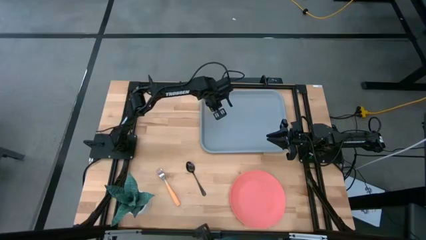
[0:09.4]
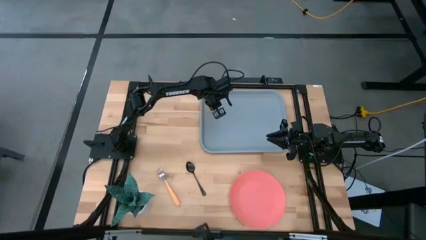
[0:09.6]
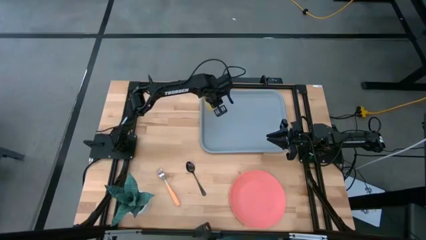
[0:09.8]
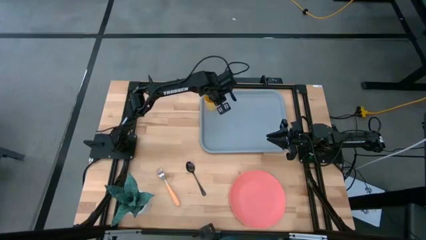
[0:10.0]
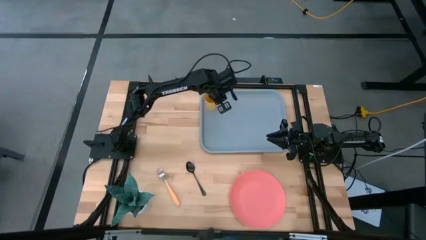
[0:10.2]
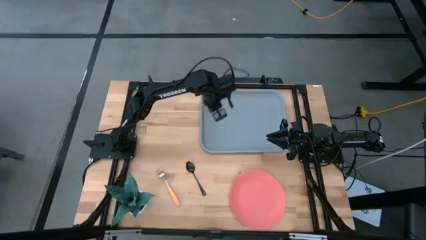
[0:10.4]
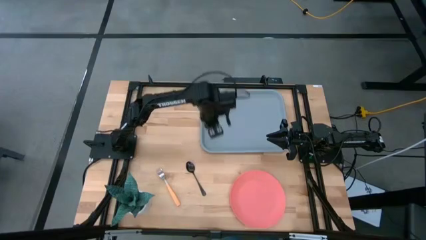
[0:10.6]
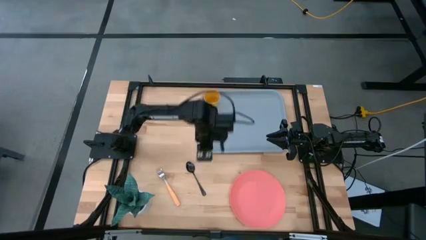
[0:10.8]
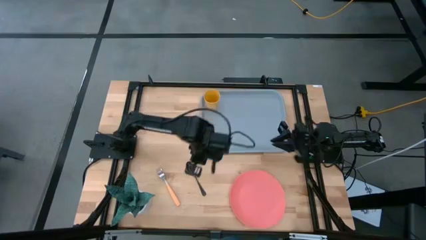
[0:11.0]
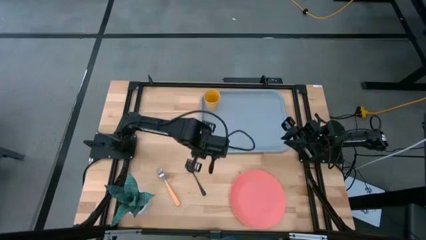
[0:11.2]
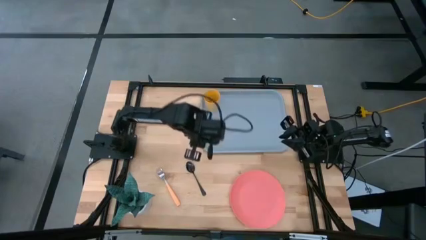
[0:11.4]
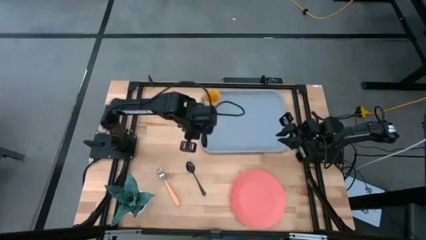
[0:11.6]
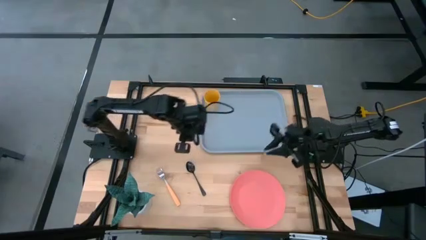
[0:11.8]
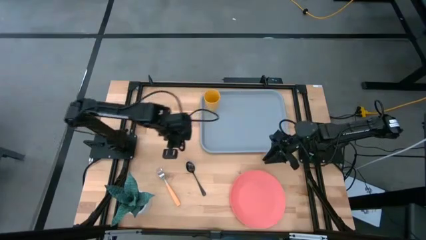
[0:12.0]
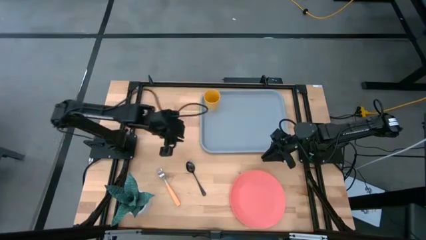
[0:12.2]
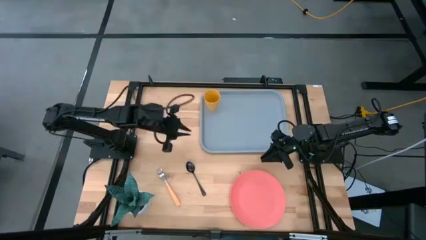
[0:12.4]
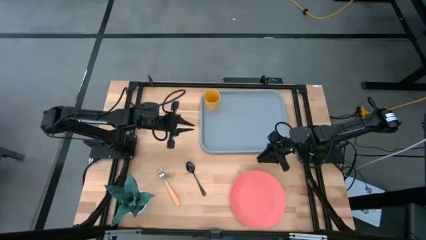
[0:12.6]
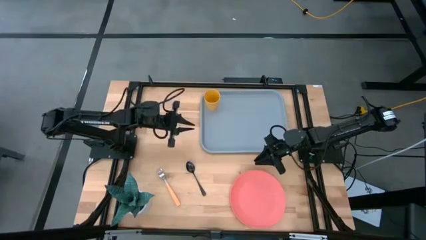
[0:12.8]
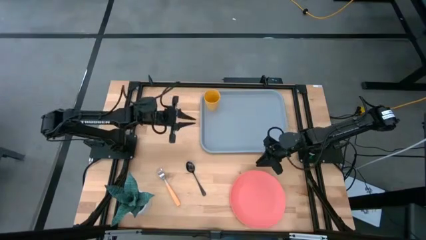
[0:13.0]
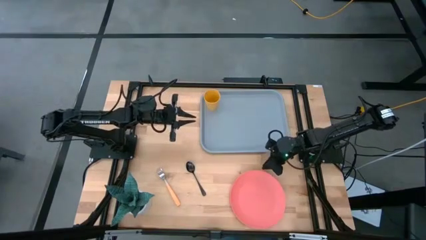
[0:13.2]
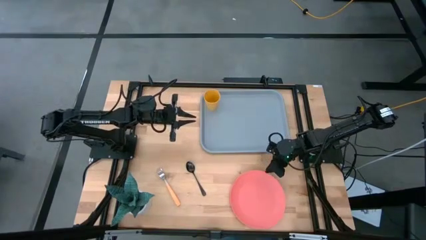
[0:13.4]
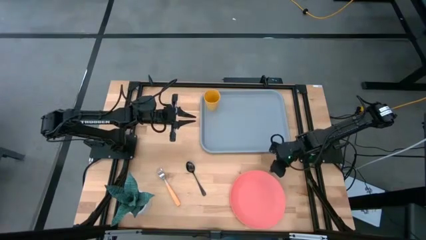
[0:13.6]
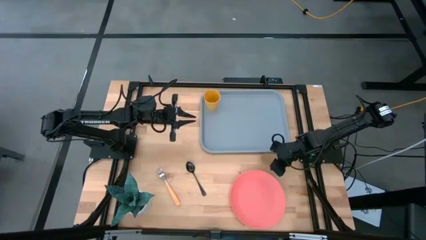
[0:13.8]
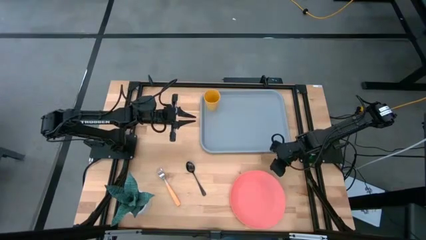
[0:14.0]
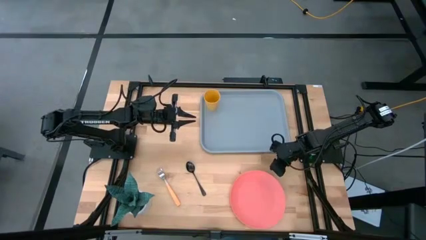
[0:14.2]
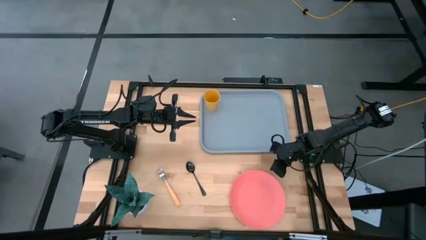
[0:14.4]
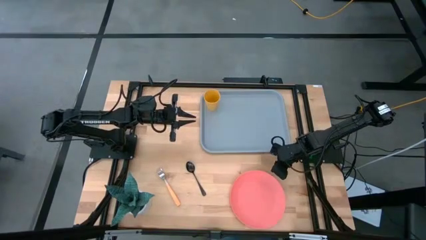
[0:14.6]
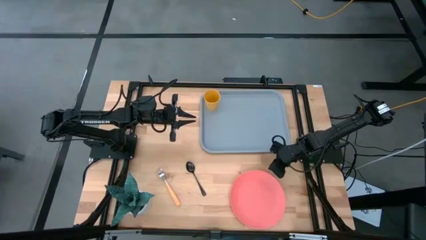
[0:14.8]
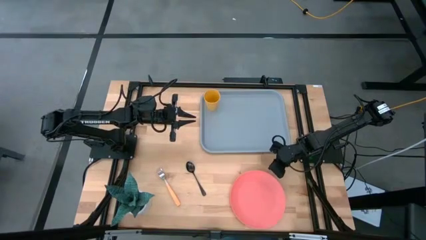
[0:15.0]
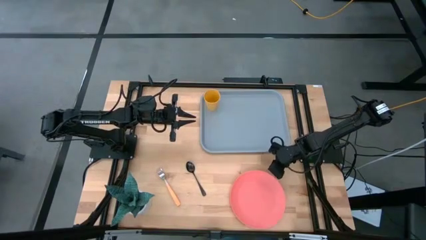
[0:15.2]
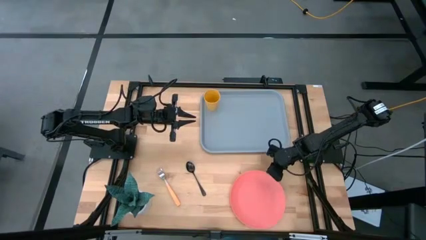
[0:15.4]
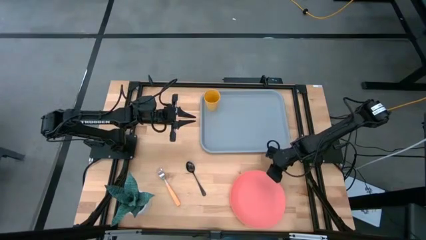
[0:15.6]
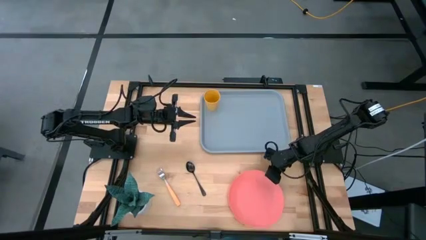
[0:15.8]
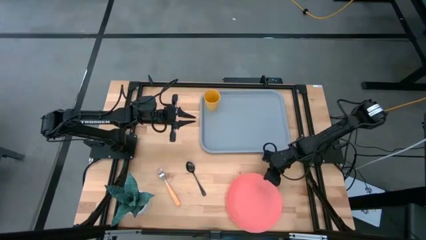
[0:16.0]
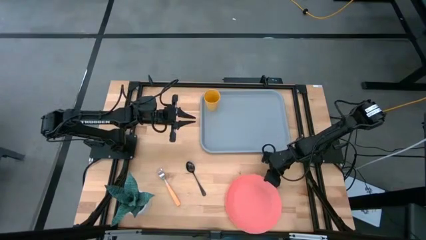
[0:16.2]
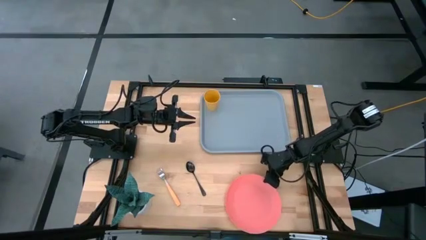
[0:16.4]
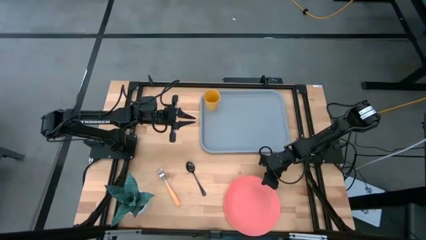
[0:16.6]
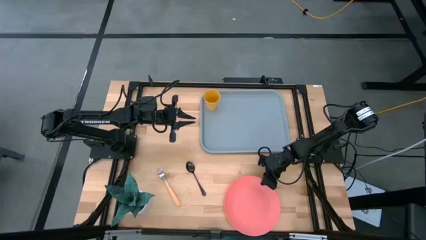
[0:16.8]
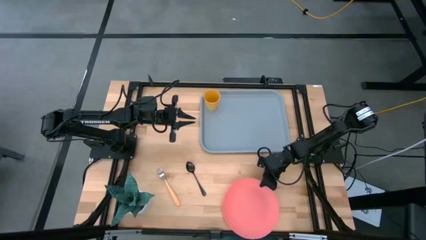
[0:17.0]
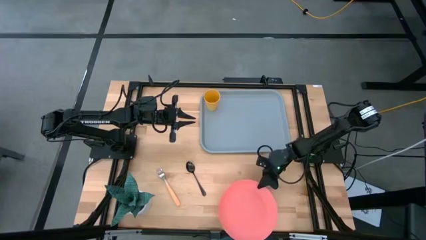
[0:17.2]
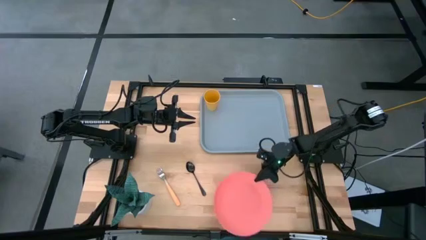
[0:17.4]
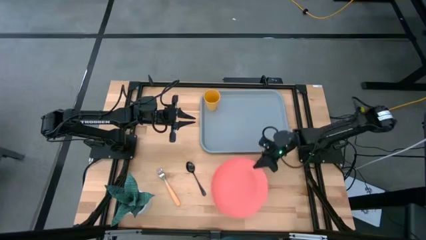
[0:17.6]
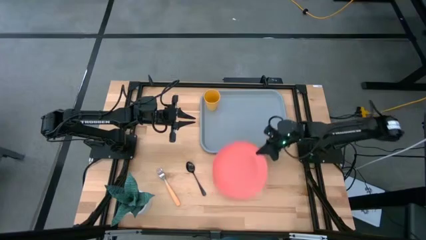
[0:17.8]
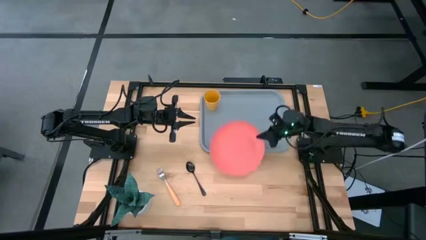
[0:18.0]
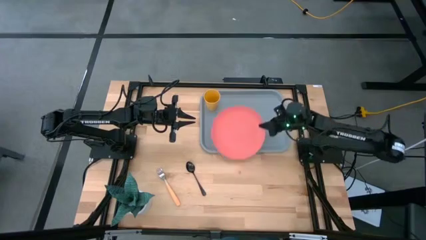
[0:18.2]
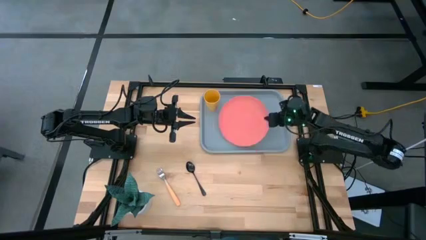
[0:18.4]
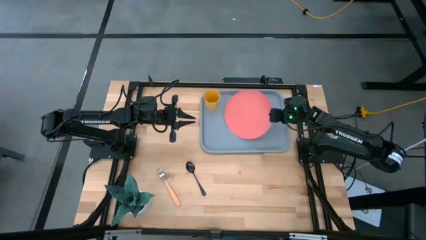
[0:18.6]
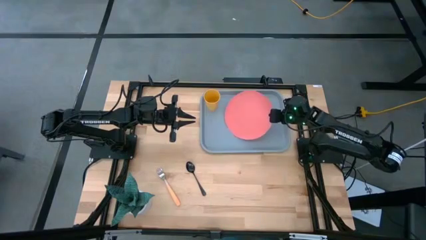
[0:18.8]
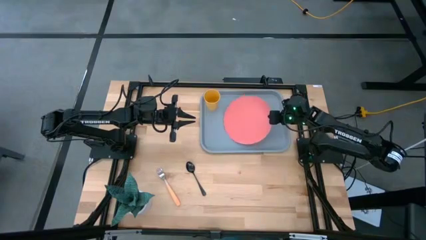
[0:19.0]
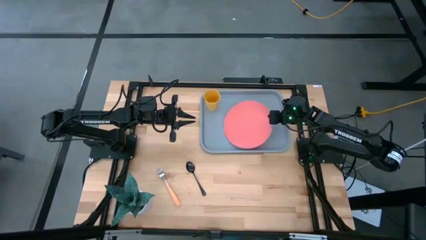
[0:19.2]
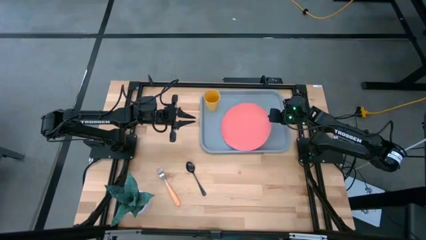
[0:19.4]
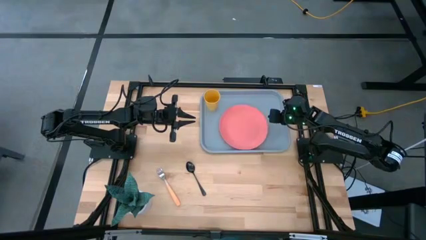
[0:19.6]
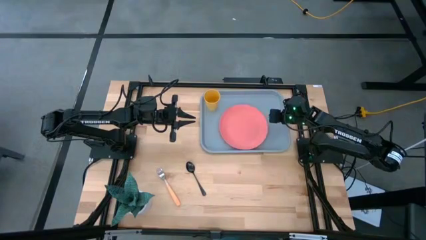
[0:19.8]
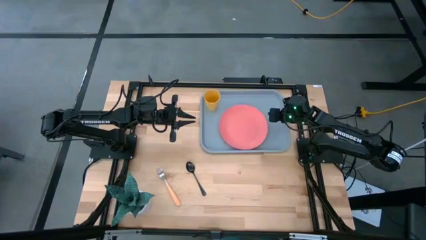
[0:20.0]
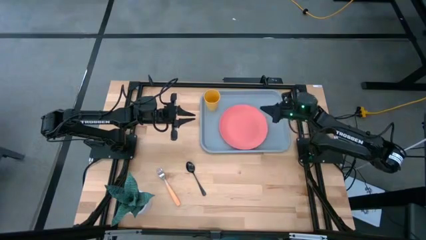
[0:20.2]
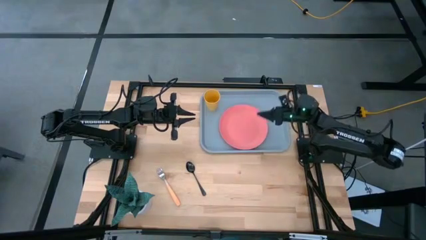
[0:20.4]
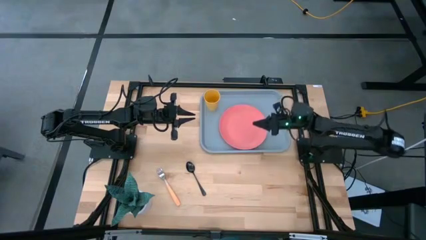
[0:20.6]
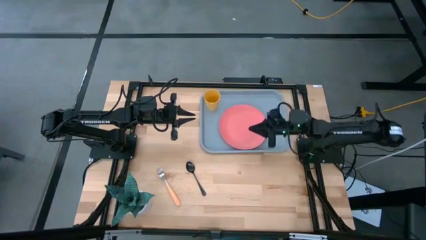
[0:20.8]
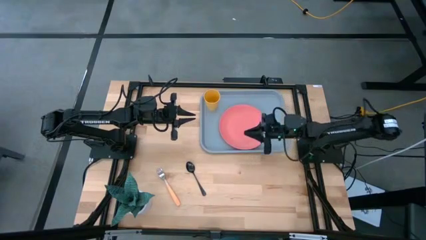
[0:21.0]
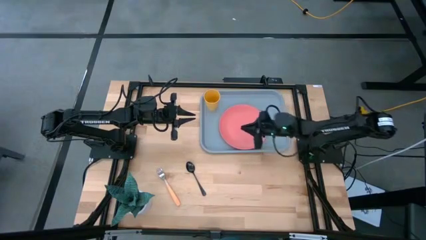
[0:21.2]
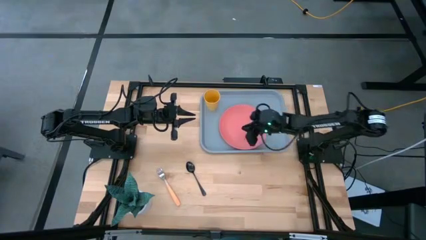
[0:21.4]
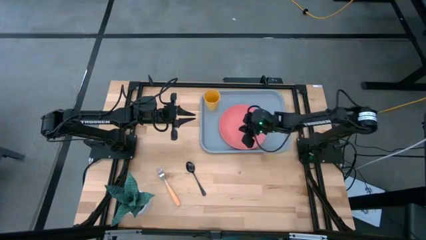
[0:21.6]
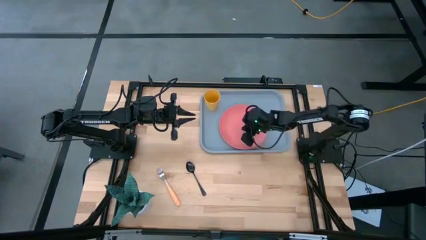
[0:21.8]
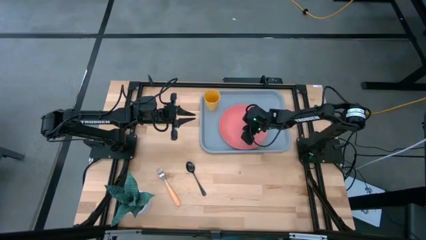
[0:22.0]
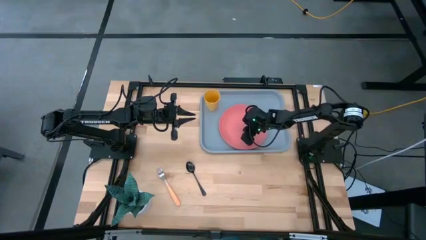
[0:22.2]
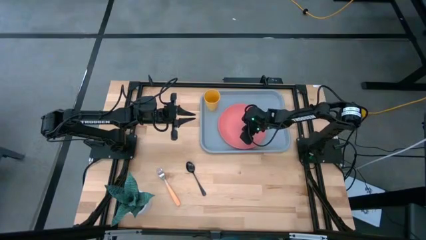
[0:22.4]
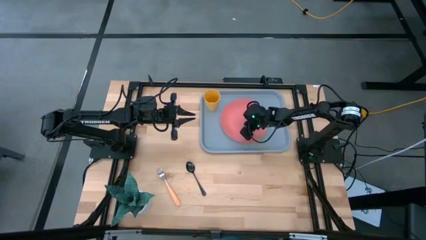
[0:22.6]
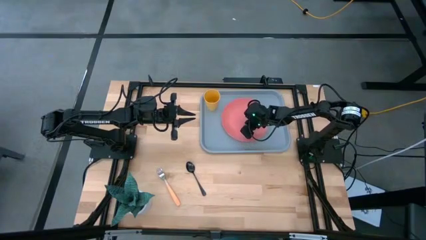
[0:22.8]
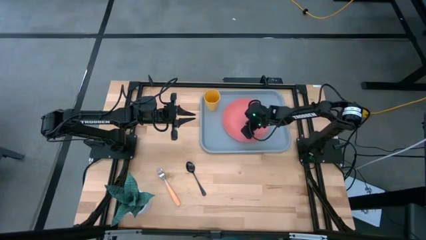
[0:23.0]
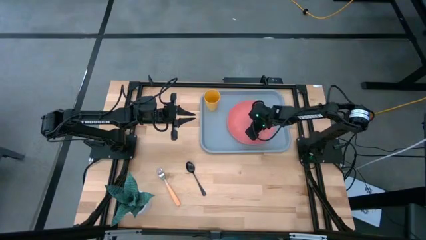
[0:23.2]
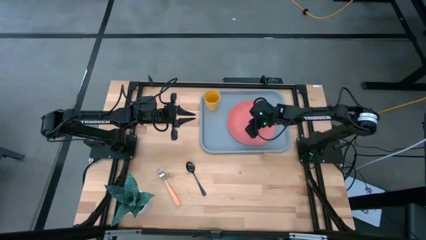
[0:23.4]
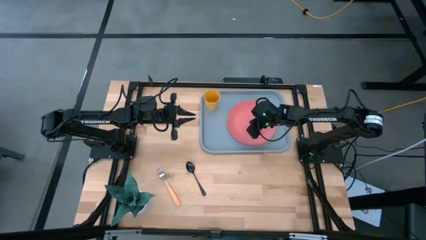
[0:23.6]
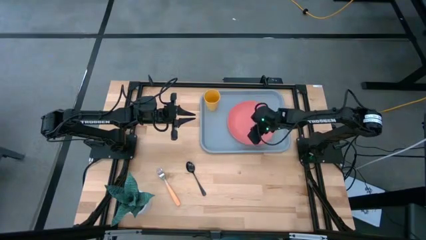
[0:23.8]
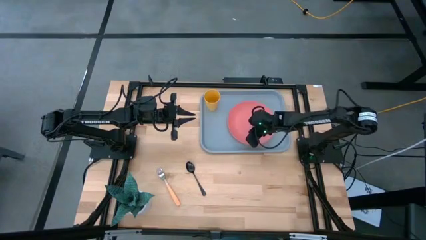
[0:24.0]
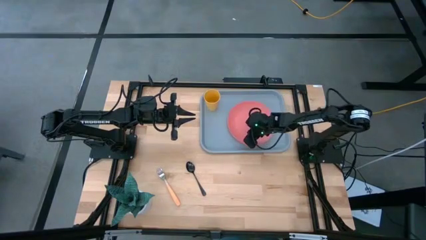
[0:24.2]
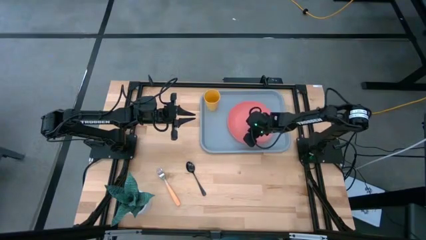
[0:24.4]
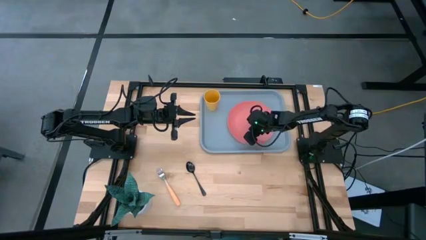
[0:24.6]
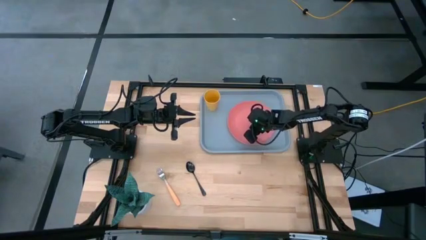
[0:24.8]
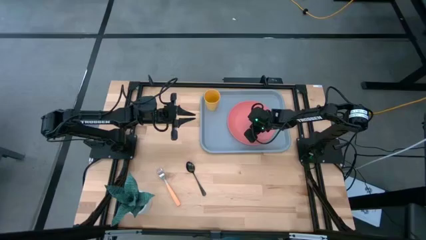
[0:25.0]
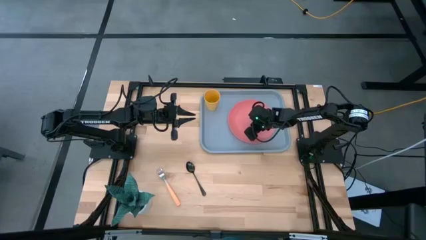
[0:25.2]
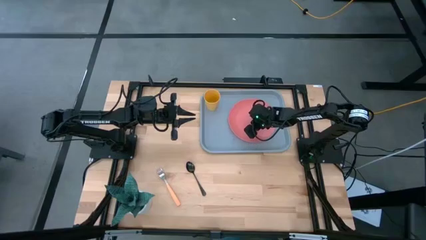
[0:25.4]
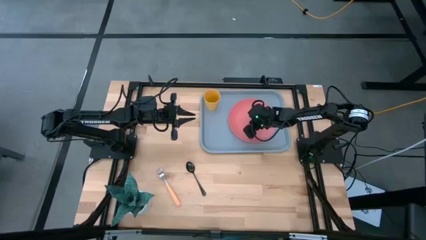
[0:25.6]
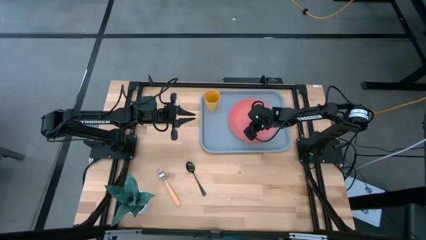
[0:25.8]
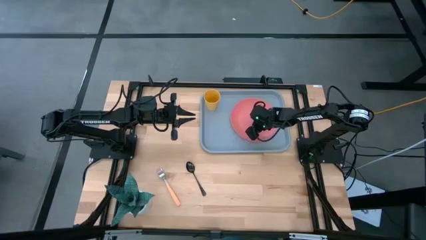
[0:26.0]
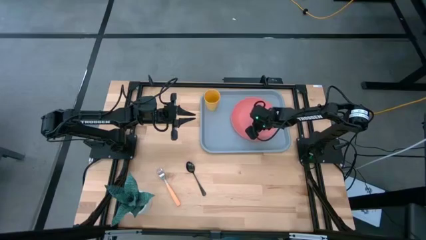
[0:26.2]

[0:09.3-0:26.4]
Task: Pick and place plate/cup/fork/spoon on tray
Put the pink plate on the gray tray to the right of the yellow cup
